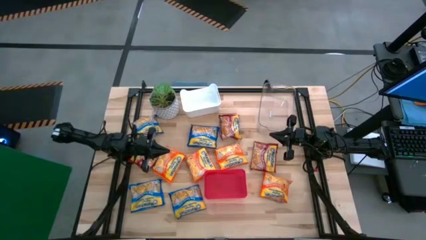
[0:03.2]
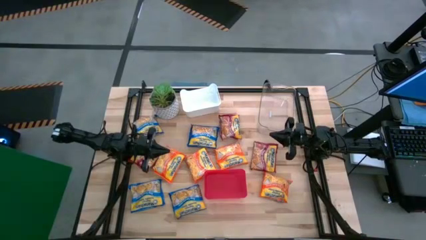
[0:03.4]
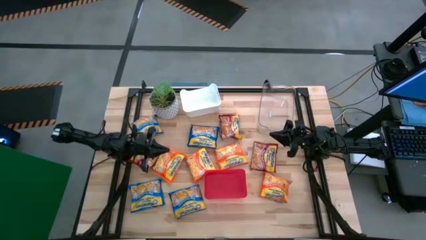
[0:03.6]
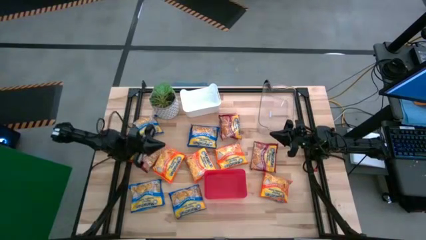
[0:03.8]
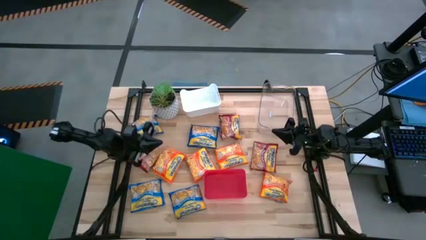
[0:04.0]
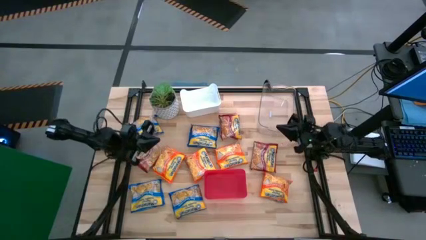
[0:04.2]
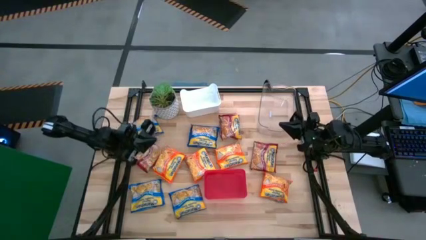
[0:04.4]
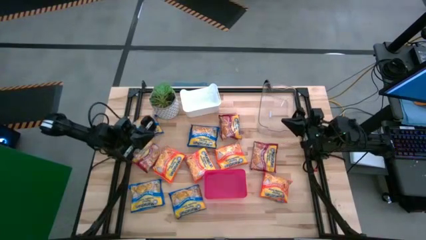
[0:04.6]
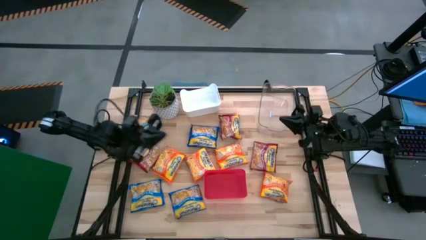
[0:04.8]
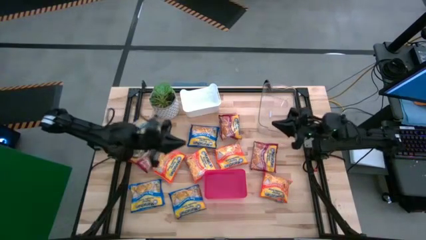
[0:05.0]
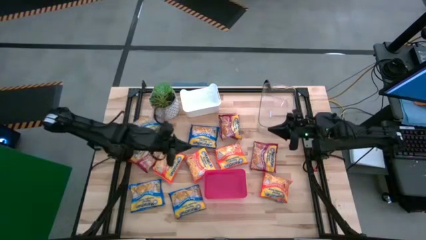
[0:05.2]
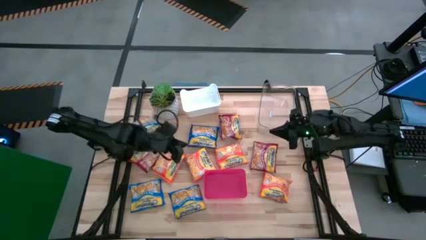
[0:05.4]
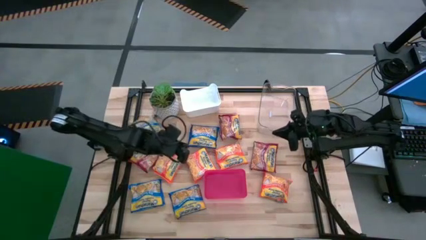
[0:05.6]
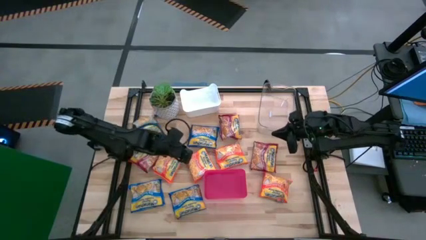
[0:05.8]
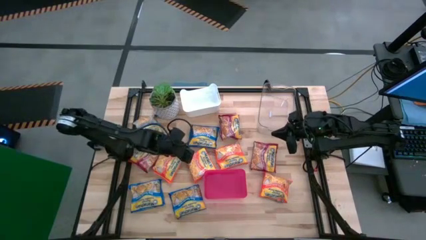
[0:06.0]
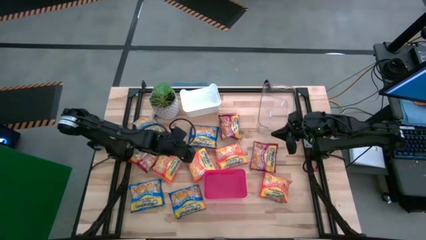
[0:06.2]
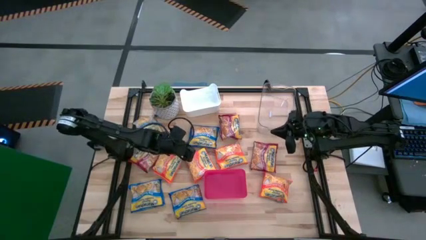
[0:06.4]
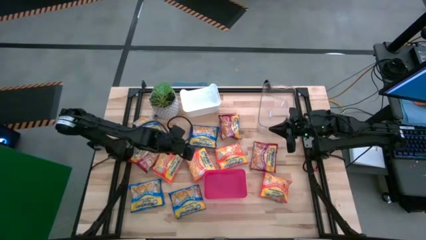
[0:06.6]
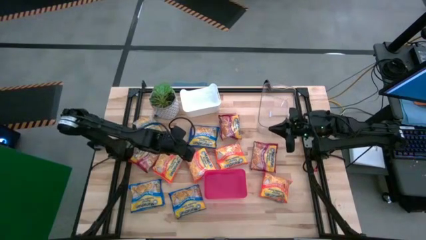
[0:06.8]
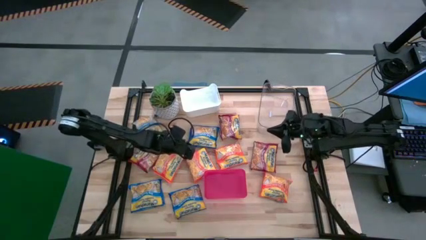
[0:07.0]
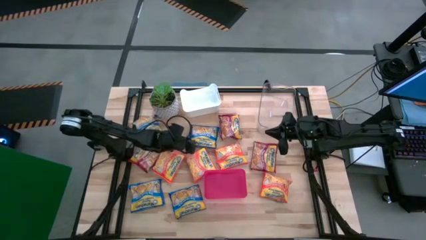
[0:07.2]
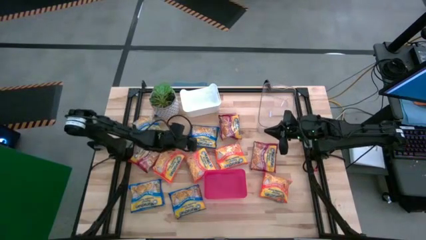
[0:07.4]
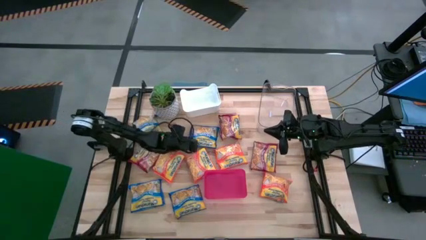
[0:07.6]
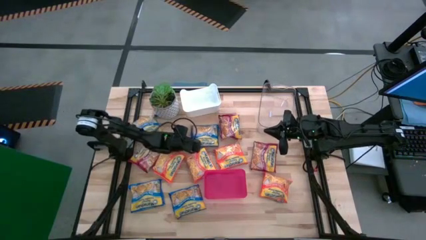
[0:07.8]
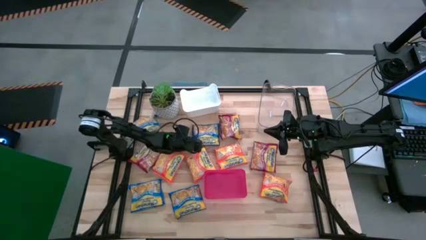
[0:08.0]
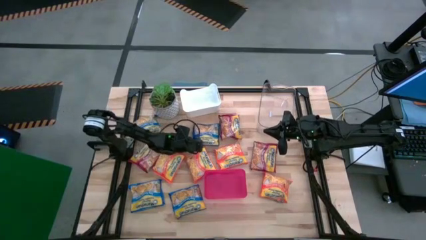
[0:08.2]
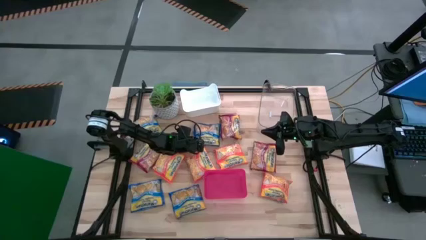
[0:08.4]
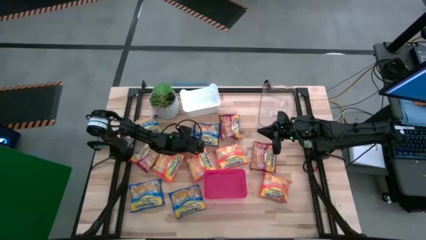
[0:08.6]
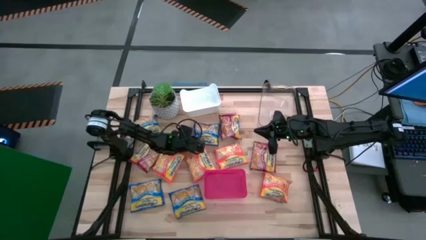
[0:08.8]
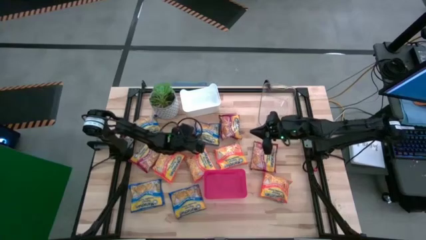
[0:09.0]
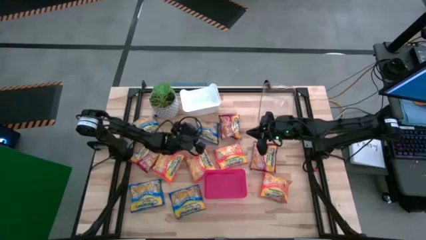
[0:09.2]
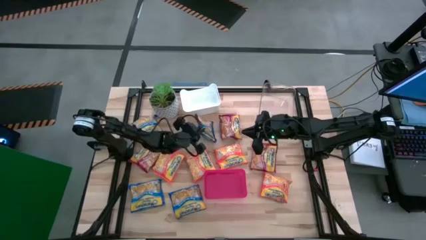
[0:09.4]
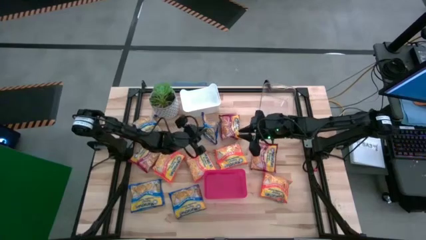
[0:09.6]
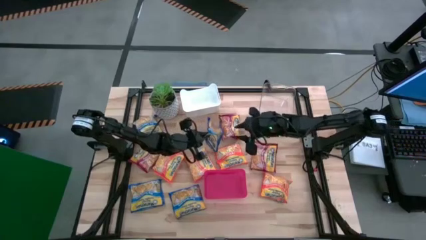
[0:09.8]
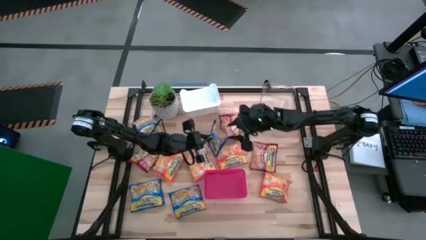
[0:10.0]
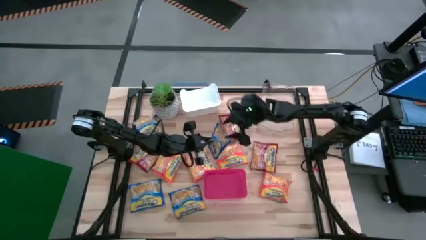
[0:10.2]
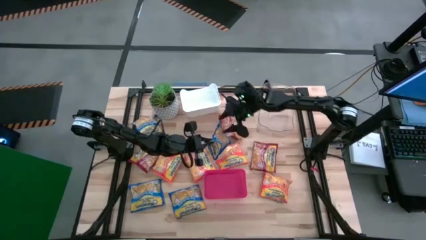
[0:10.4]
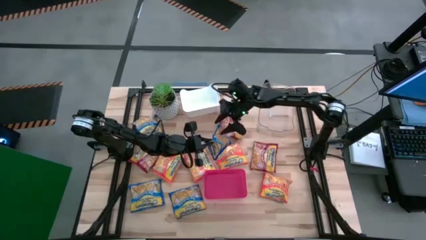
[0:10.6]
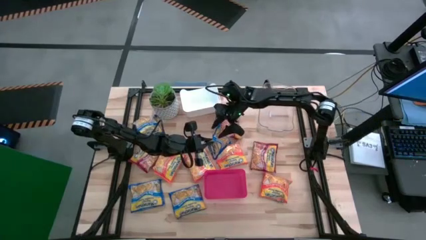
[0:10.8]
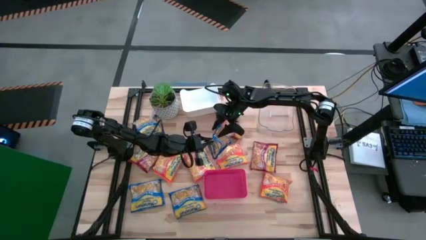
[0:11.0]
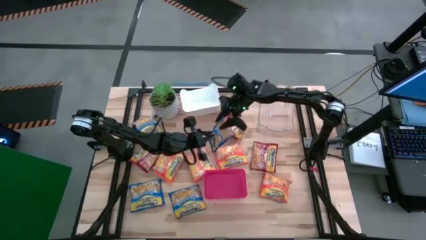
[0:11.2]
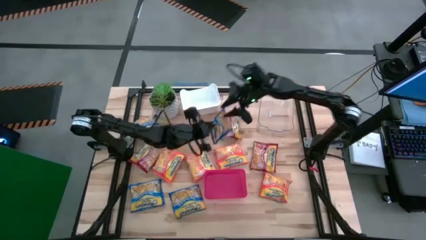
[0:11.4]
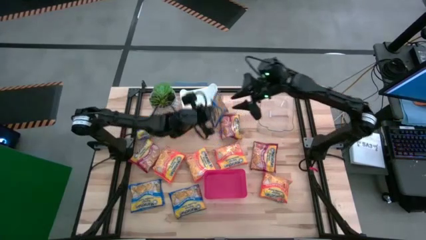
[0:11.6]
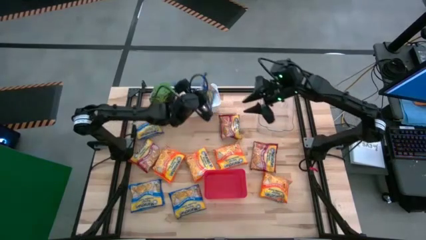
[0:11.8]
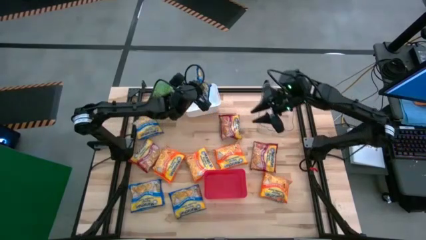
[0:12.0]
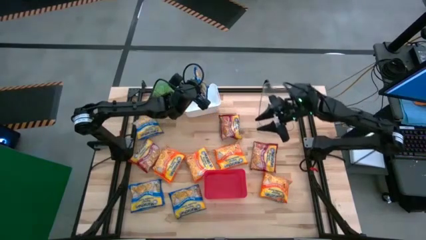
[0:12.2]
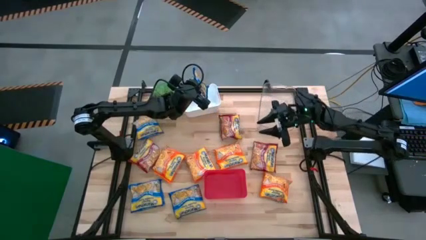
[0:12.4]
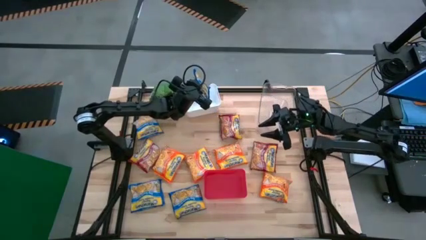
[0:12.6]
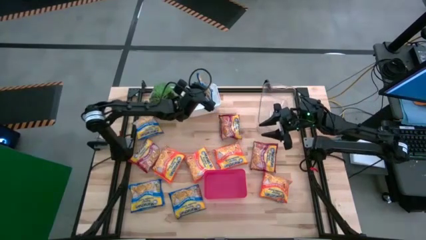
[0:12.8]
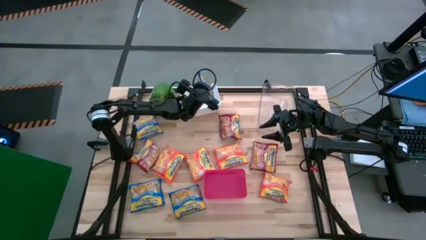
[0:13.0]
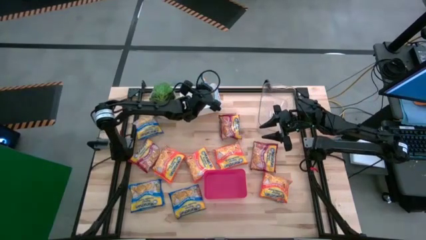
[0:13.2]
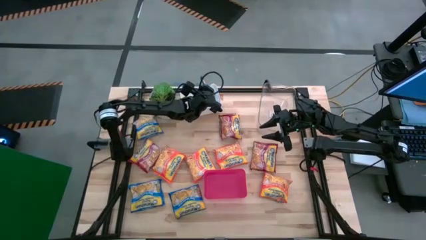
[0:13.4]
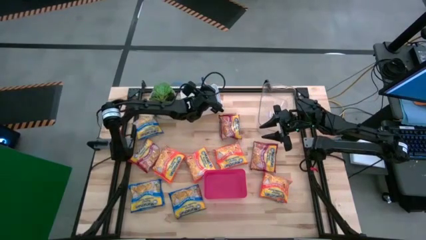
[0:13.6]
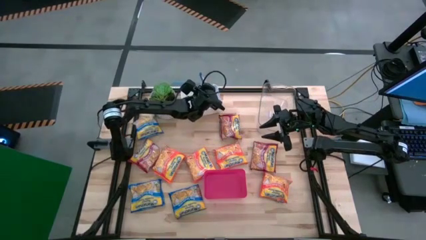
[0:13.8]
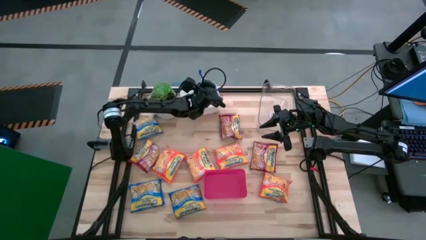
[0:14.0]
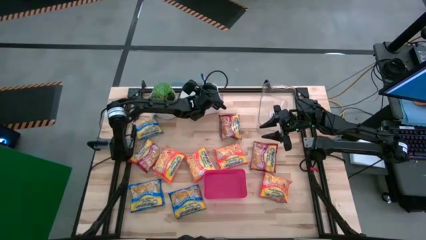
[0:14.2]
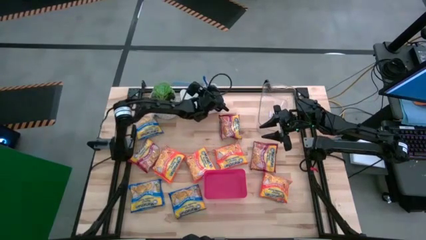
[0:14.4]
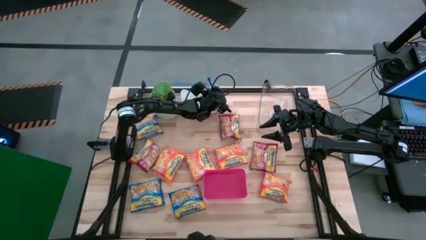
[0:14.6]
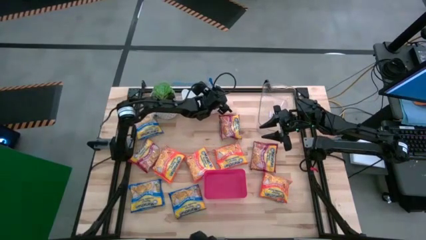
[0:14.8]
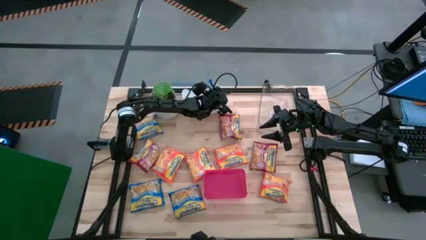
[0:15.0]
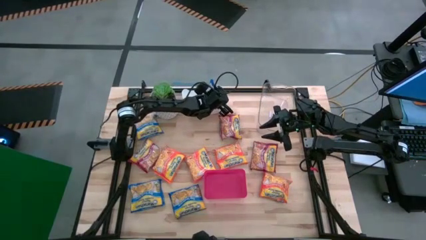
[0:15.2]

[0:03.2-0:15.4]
Task: Sort Maruchan noodles
Put the blue noodle pack into the white bin

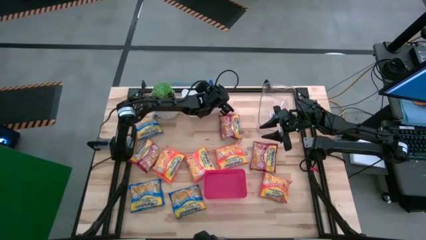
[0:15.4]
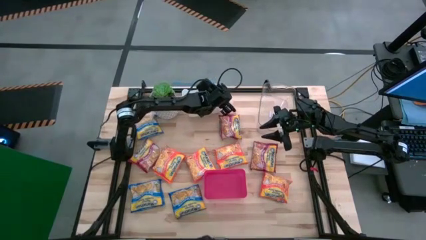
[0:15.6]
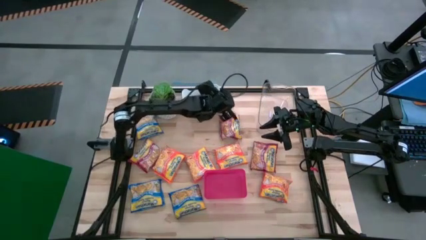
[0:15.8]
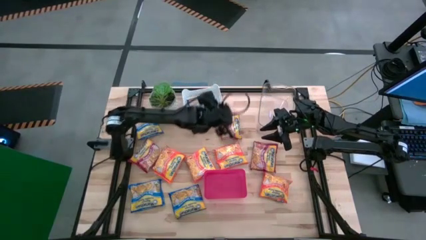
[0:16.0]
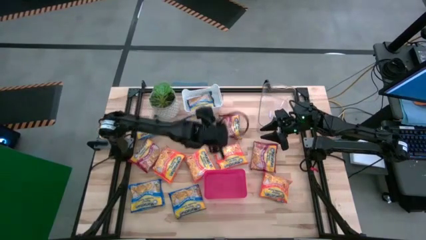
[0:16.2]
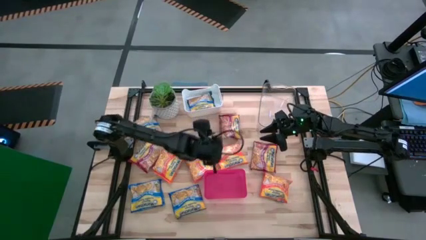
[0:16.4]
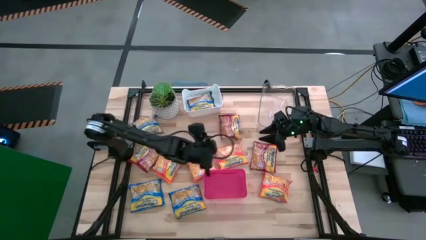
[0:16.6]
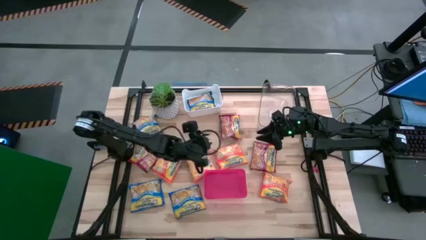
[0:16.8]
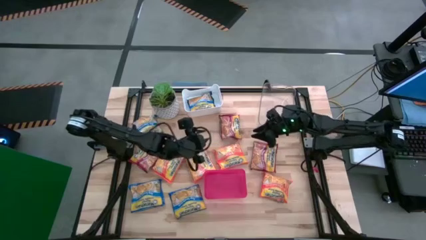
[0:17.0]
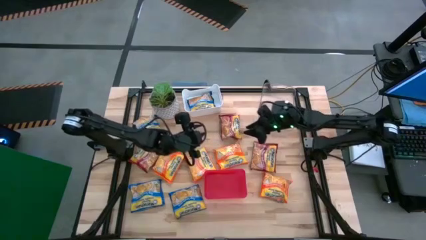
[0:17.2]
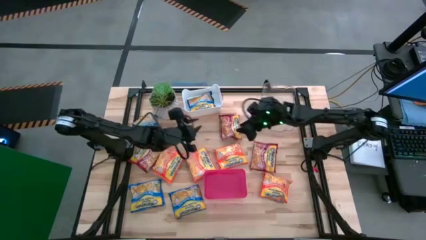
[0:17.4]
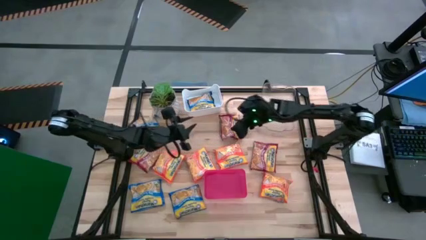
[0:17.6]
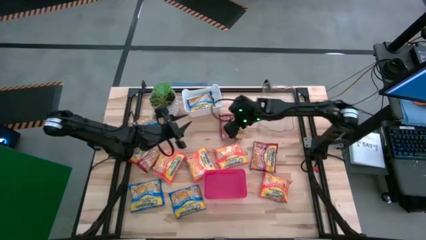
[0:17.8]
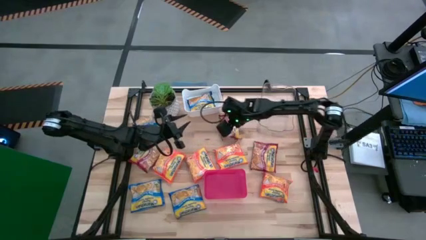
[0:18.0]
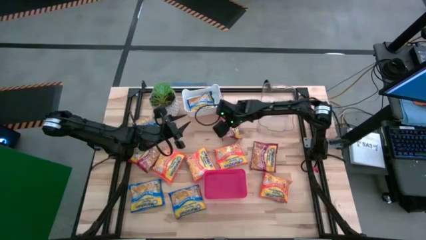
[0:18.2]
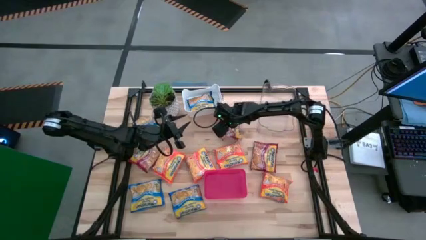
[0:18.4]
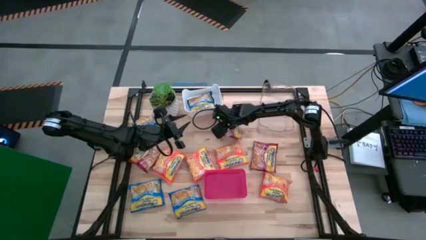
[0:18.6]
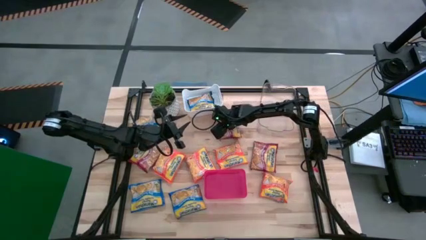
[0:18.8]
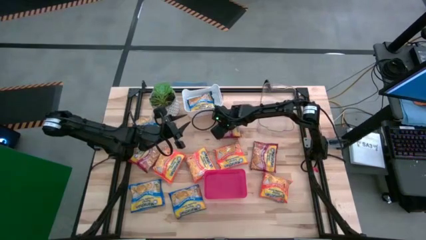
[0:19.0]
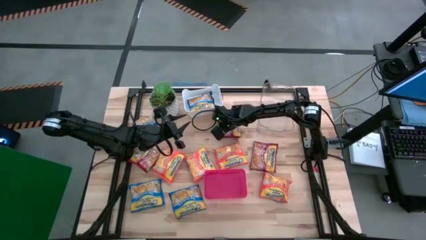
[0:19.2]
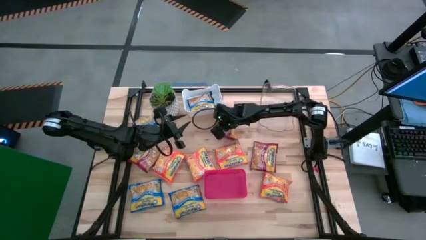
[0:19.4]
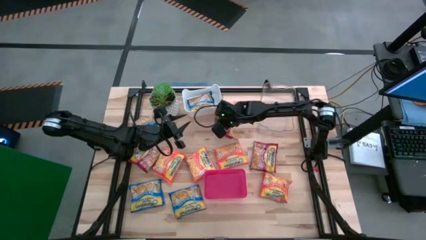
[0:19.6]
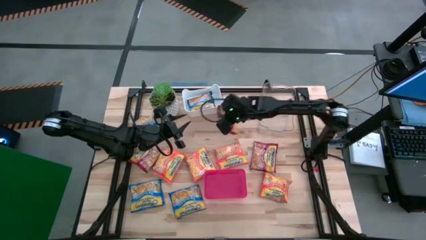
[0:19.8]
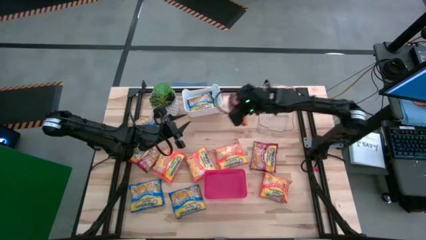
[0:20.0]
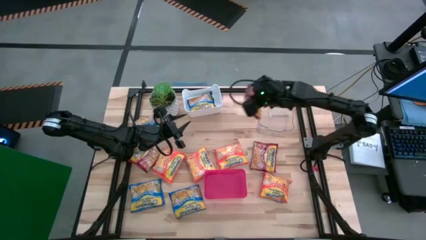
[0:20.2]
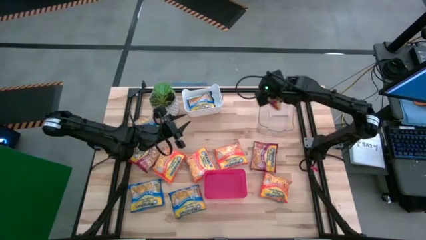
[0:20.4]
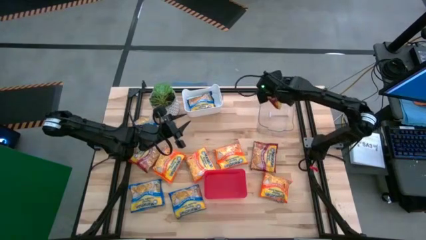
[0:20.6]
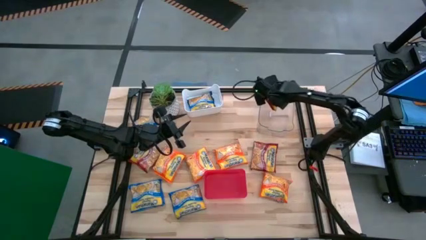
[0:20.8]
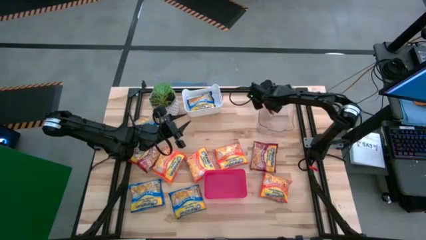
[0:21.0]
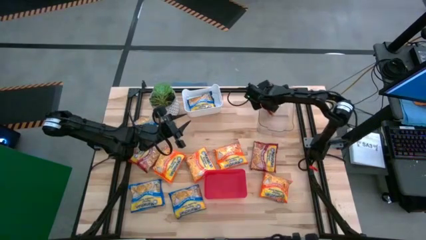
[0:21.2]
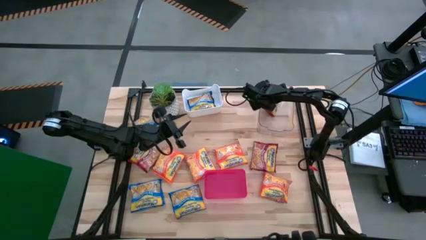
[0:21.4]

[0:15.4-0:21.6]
Put the red noodle pack into the transparent bin
